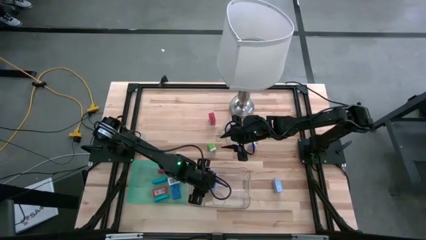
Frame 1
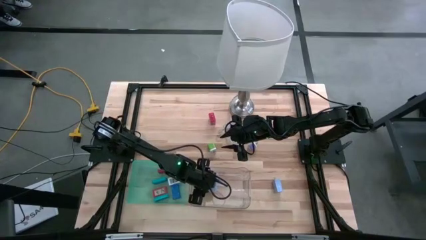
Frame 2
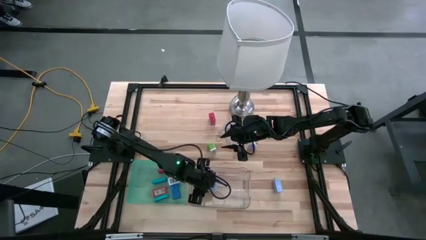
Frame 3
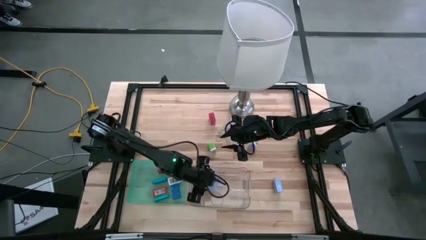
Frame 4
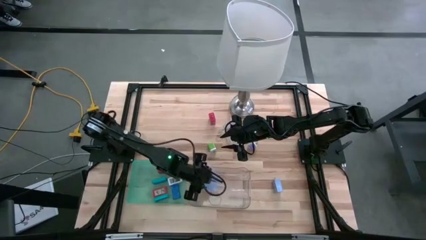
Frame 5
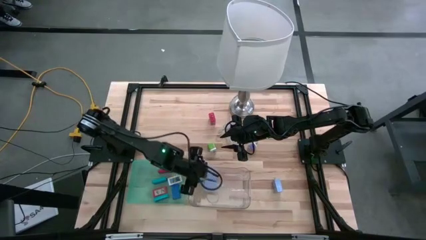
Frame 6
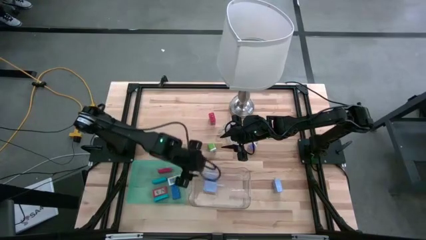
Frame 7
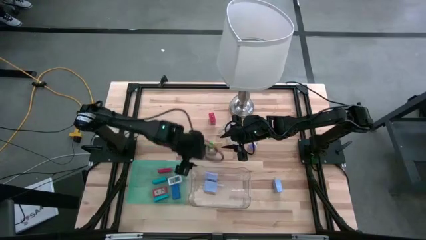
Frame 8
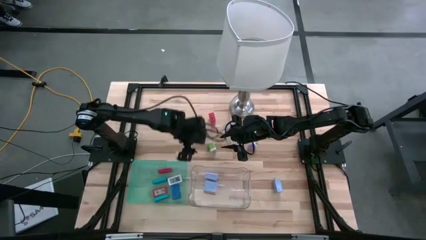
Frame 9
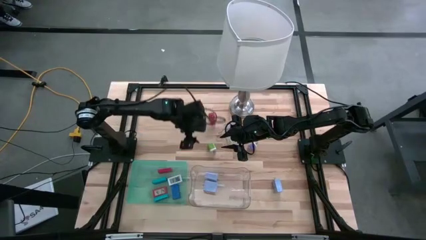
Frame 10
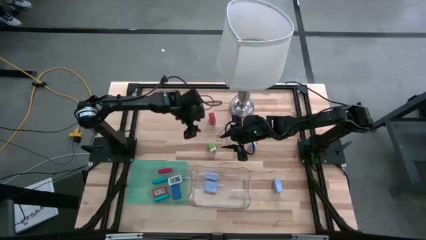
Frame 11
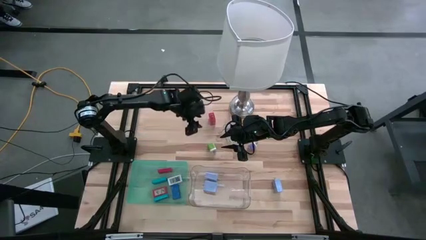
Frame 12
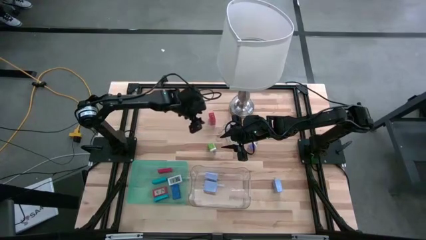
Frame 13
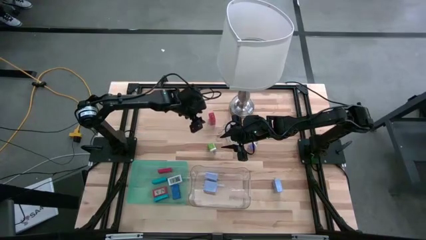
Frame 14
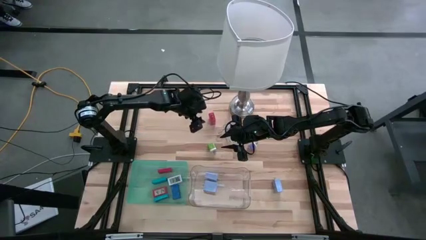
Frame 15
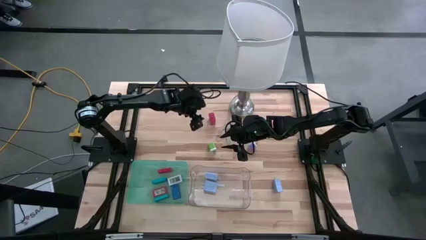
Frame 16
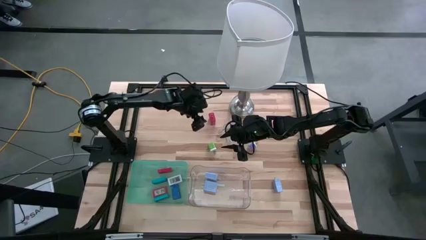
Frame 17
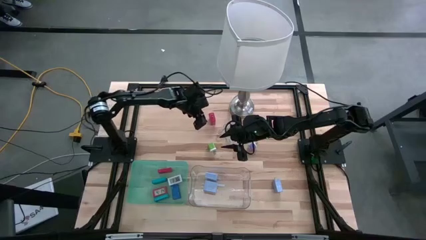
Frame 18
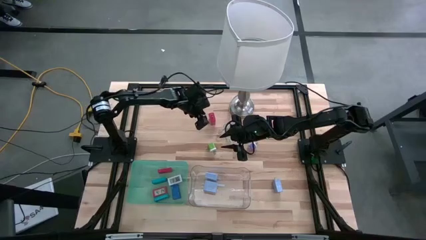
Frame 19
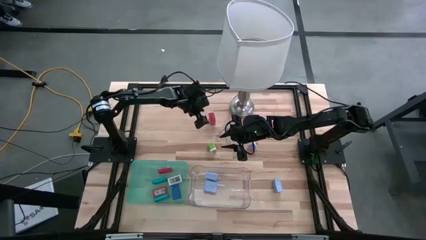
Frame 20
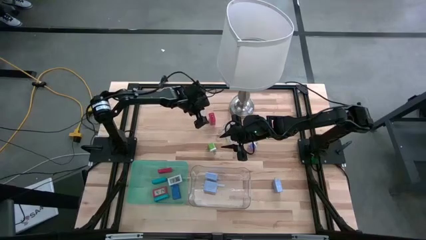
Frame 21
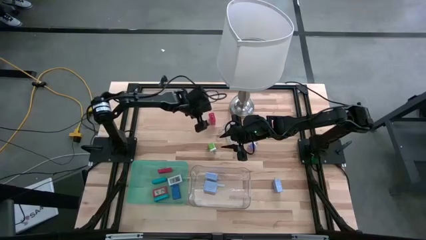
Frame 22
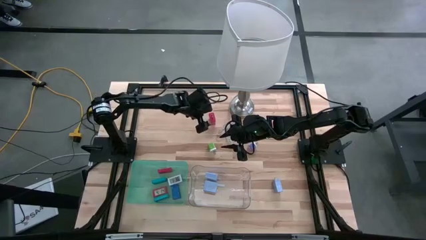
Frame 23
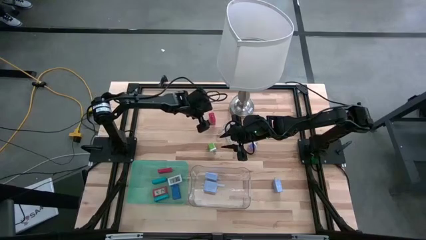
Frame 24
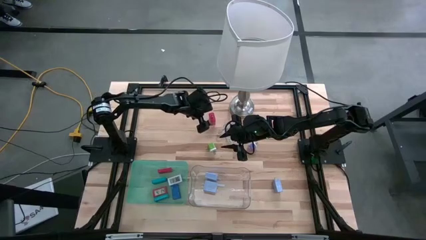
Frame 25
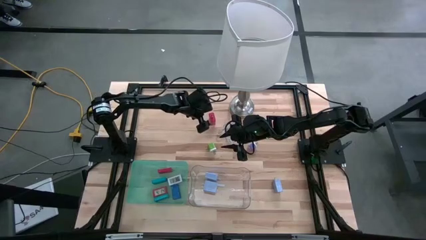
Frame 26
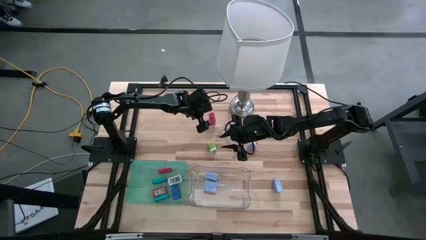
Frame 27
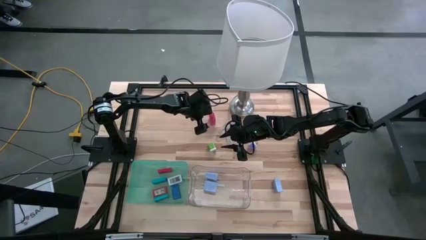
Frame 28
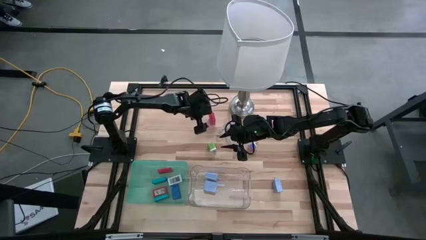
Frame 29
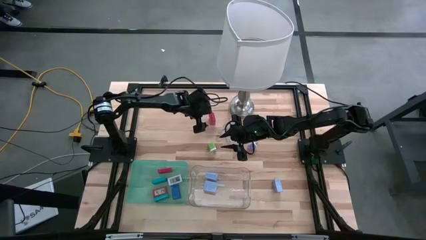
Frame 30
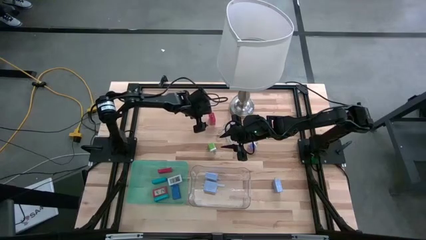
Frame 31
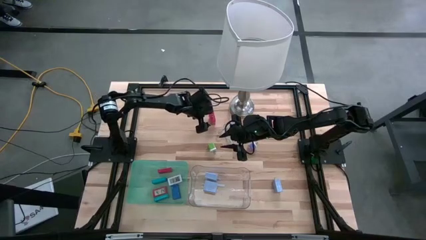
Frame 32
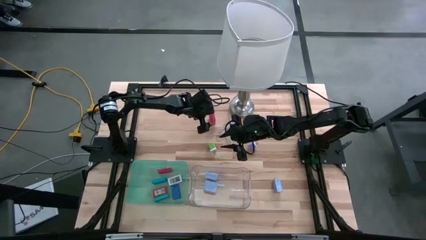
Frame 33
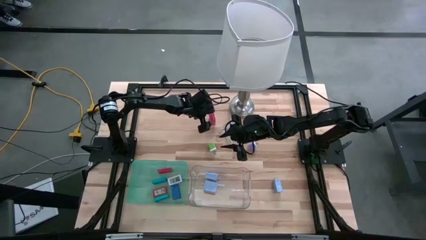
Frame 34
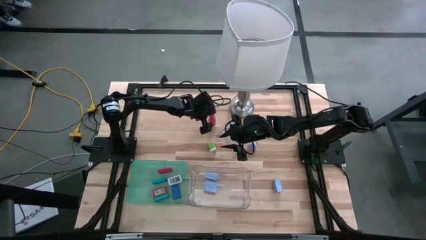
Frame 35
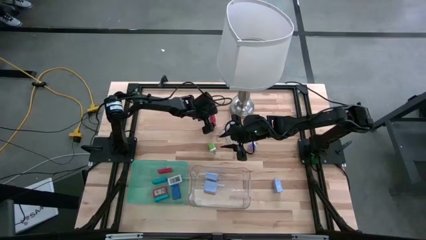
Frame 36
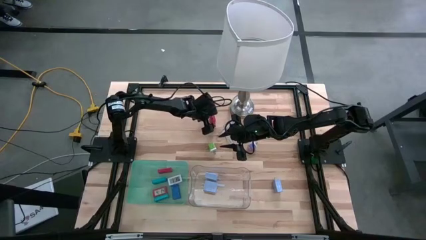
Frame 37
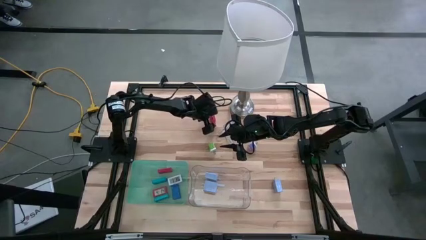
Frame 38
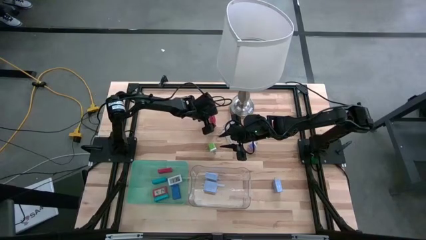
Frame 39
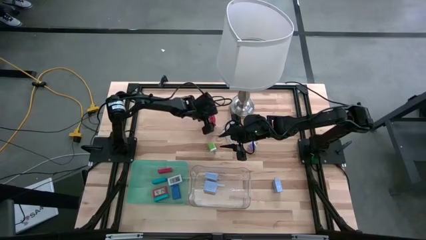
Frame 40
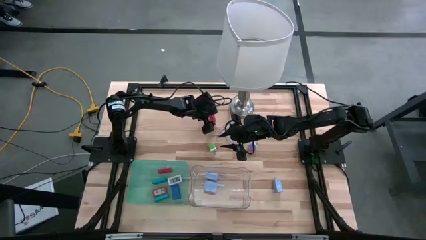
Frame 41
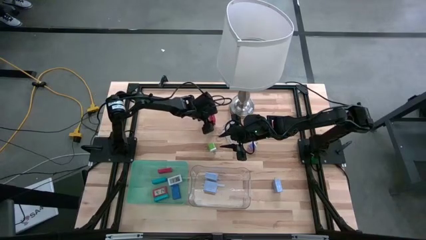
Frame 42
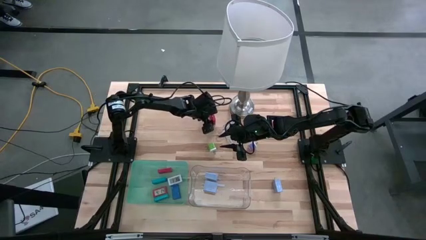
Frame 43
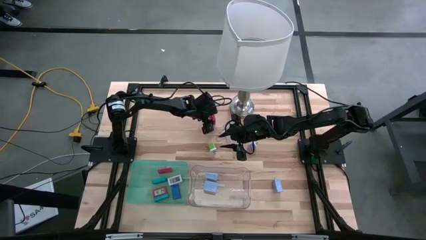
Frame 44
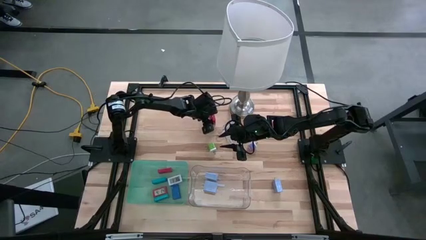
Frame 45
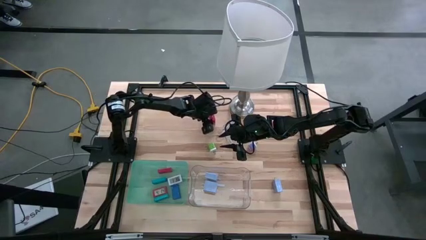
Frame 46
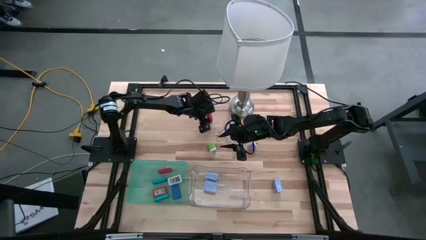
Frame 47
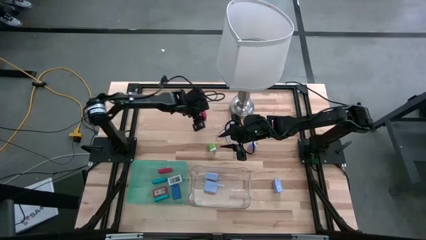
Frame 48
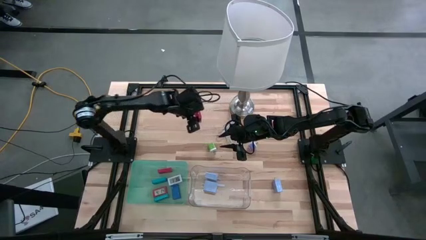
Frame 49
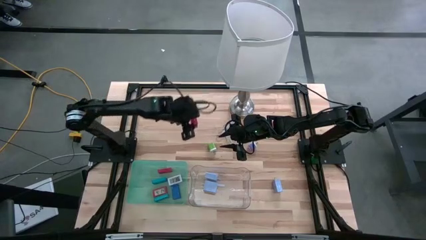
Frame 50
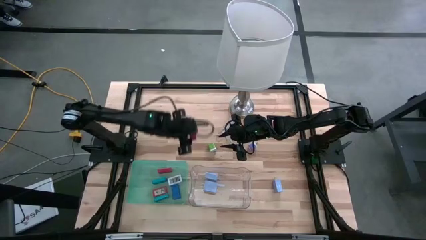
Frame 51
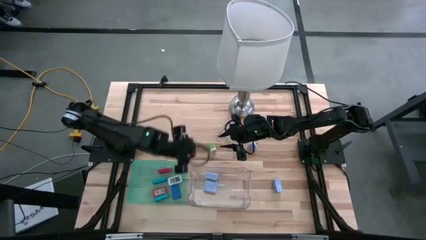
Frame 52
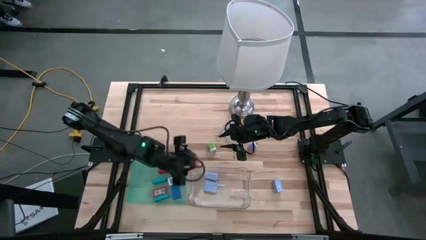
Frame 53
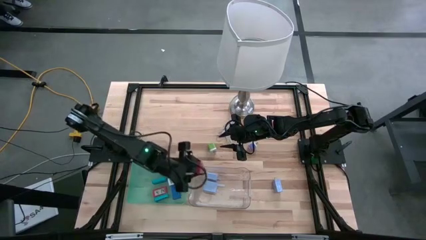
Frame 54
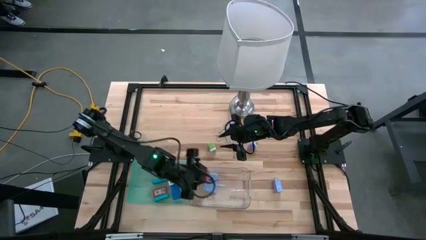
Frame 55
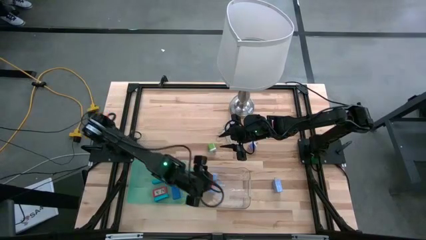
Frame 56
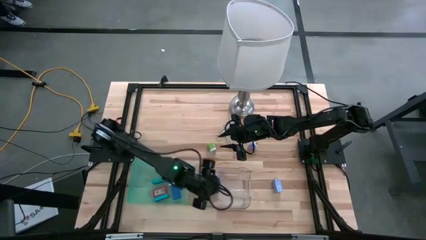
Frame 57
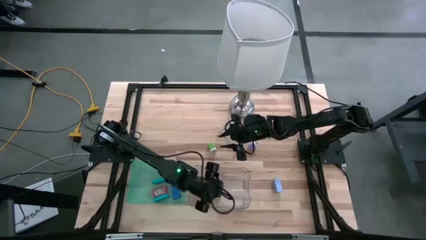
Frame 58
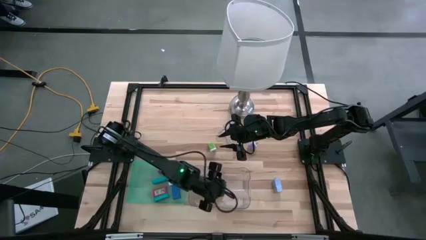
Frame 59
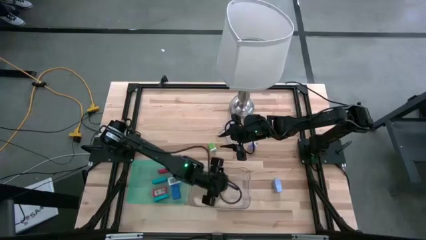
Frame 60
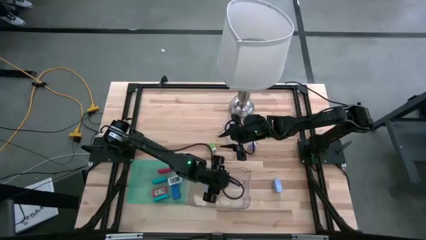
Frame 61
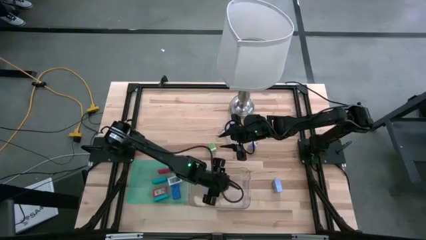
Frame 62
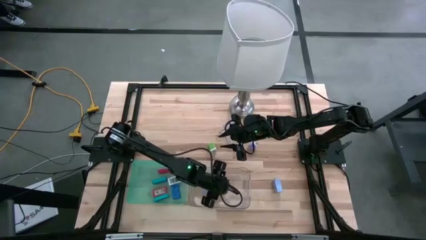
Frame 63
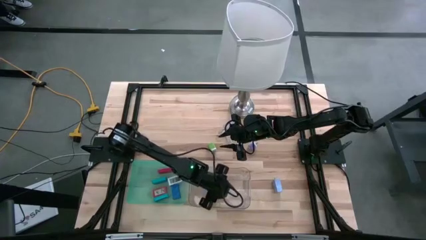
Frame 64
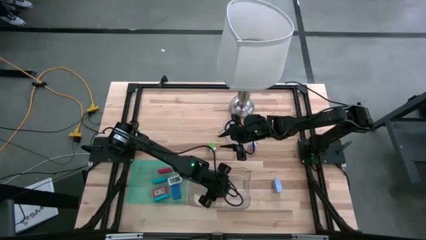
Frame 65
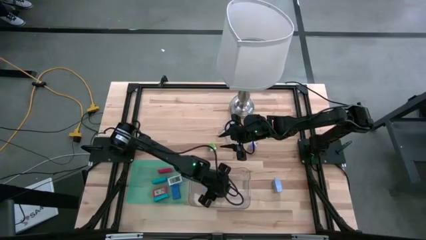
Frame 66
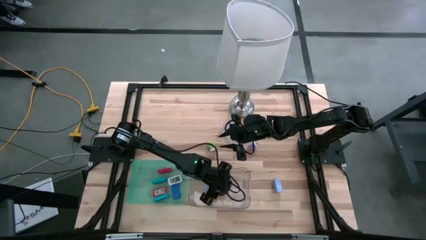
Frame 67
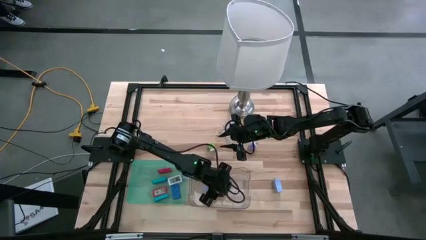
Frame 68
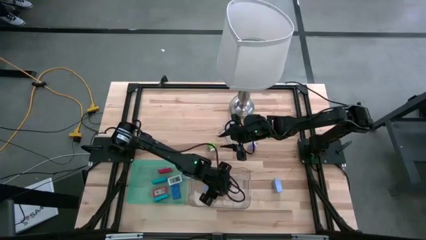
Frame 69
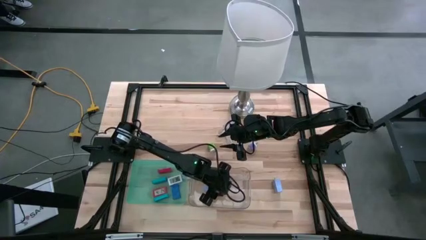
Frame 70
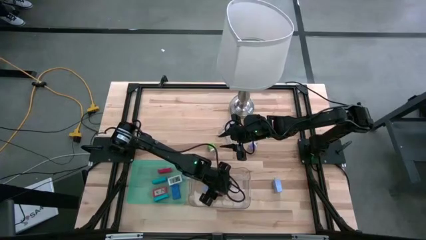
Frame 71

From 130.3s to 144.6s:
Task: Pick & Place Office items
Put the red charger adapter into the transparent bin

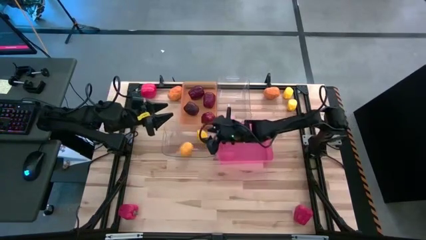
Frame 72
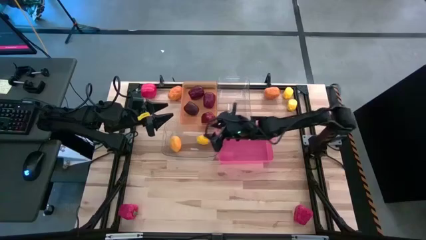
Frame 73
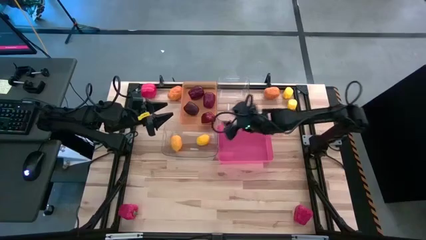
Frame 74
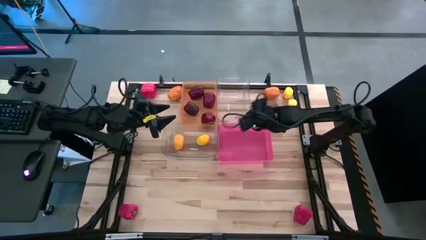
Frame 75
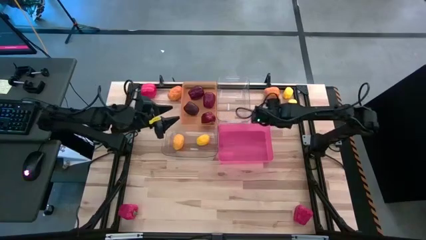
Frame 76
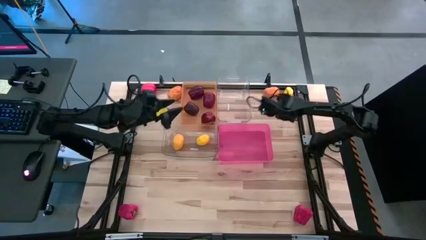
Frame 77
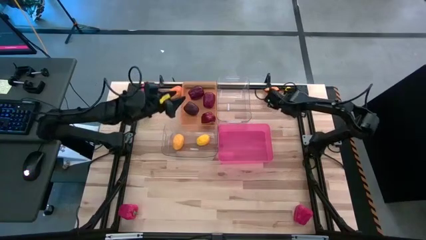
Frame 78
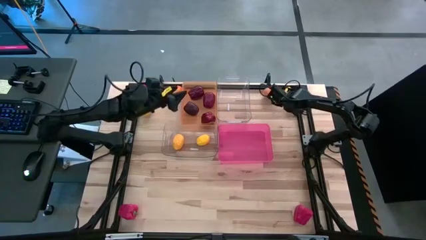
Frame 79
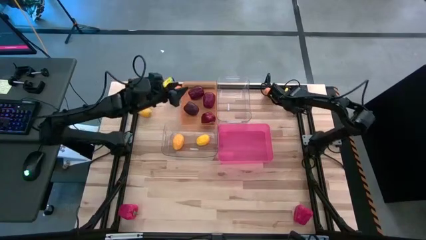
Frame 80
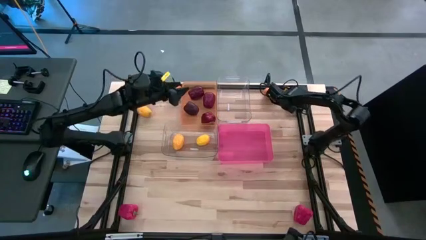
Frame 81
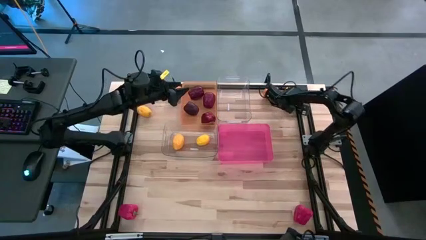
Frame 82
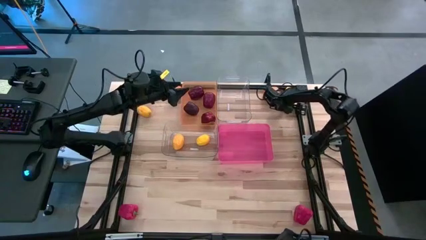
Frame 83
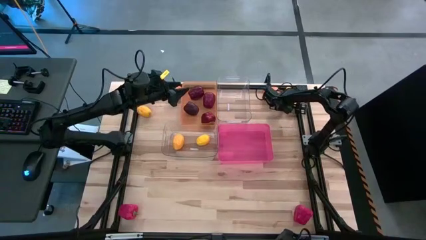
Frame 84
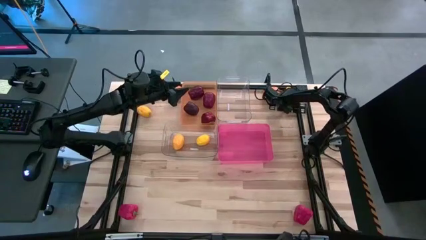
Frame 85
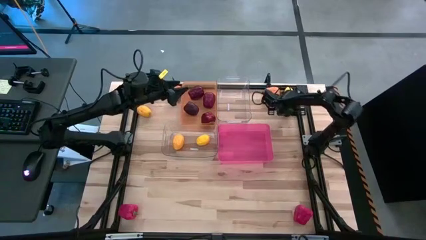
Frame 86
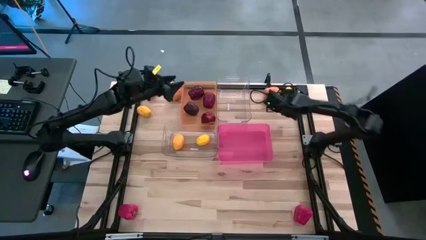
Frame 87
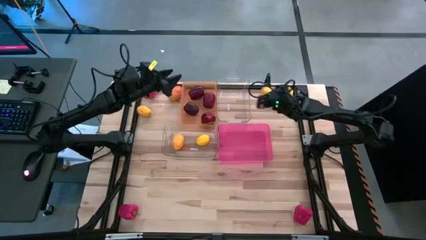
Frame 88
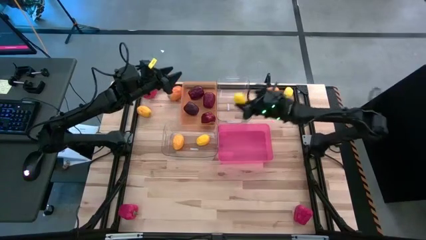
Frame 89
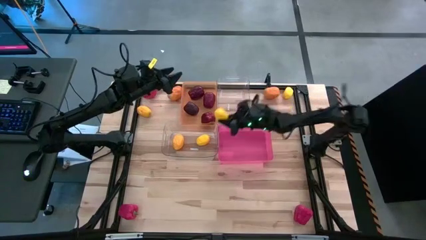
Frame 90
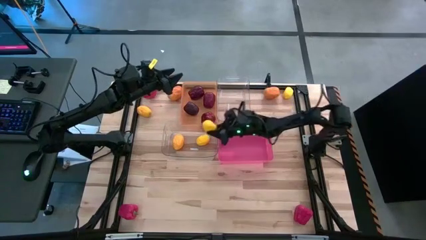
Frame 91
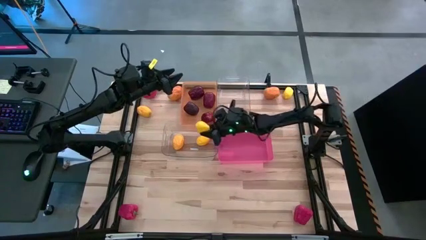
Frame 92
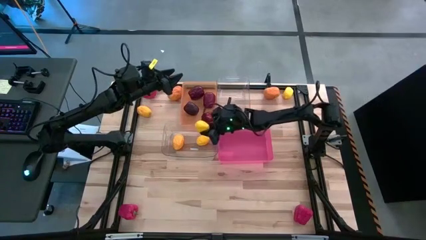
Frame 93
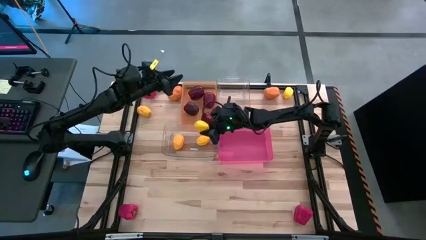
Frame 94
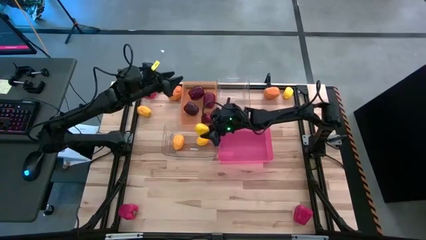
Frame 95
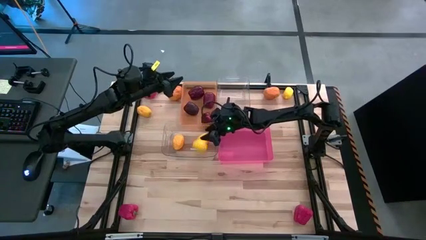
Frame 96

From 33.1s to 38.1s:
Task: Sort produce into baskets
Put the yellow lemon into the bottom transparent bin
